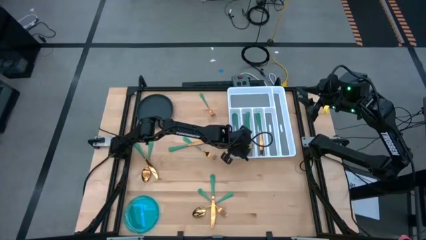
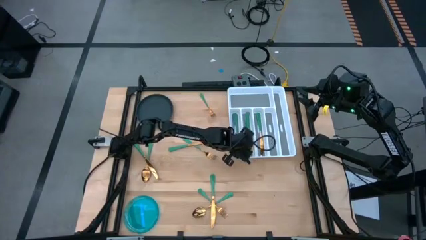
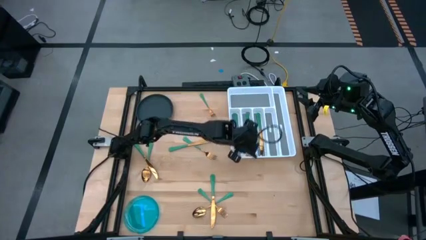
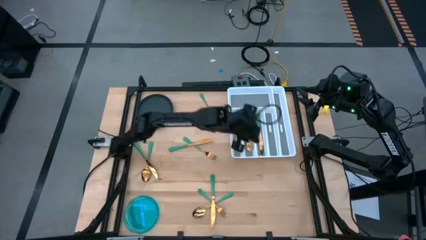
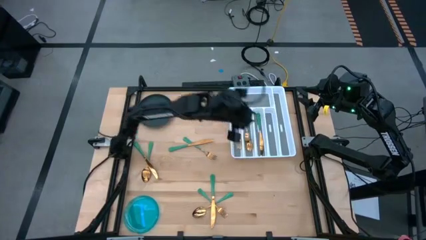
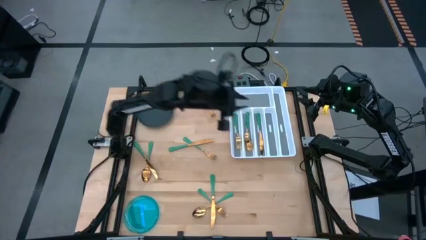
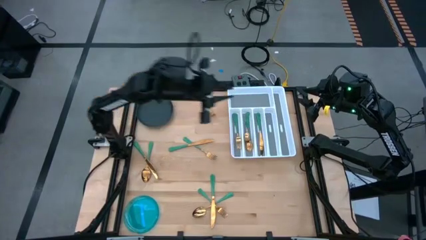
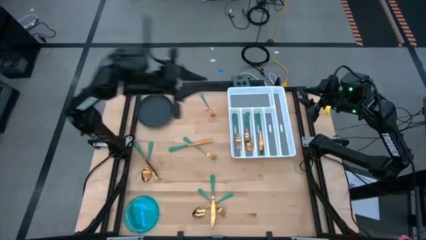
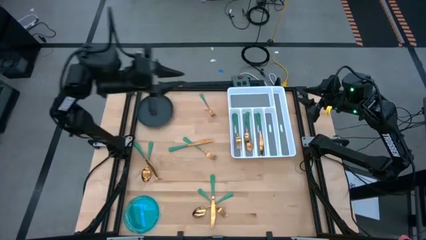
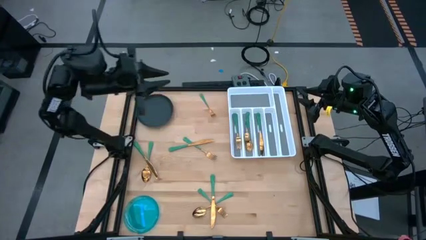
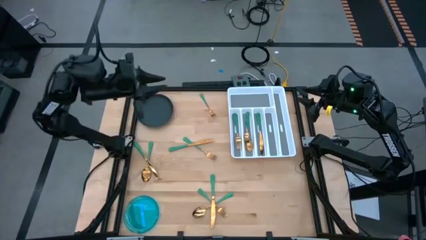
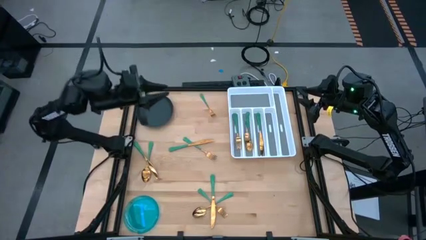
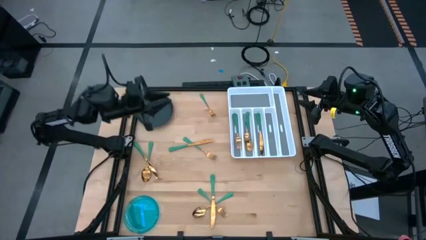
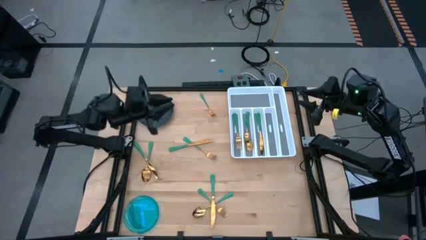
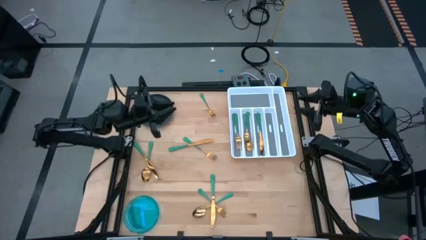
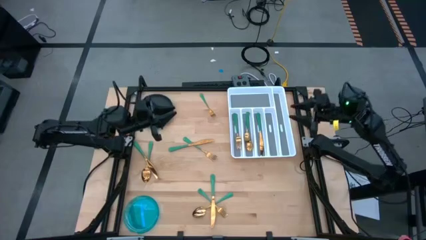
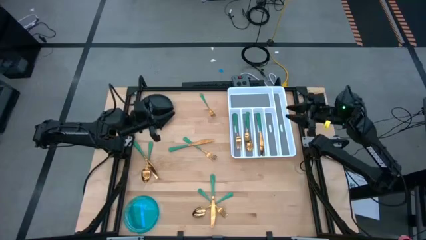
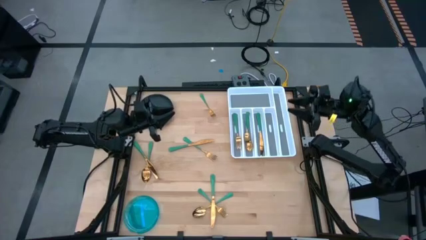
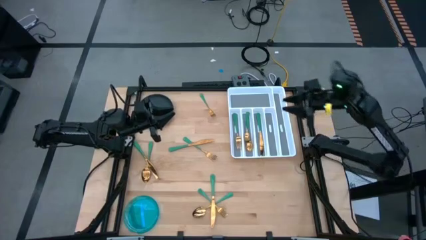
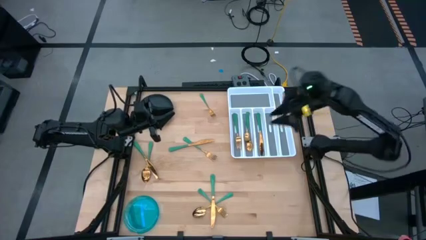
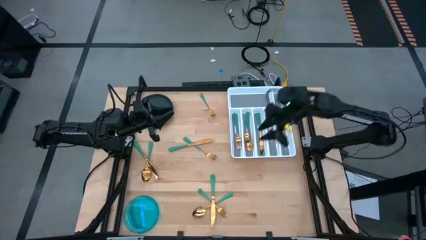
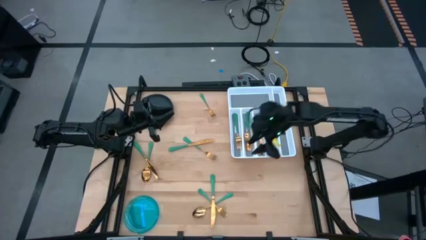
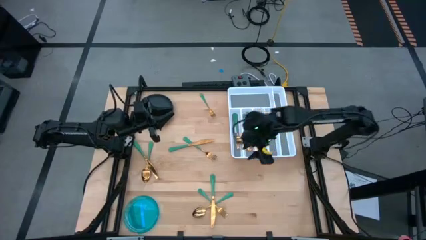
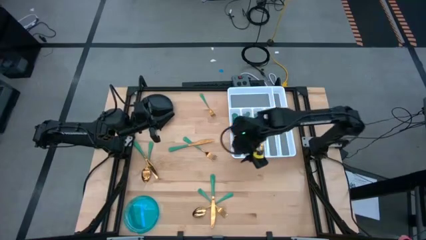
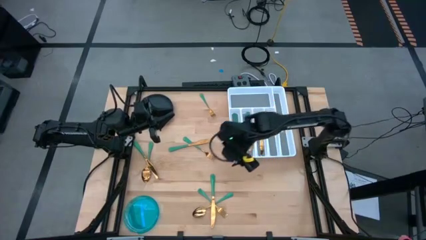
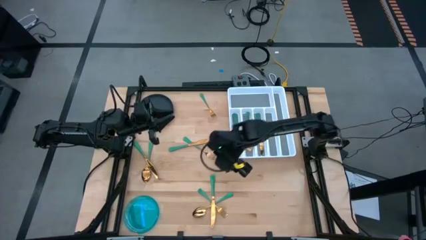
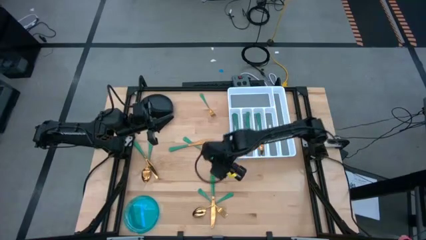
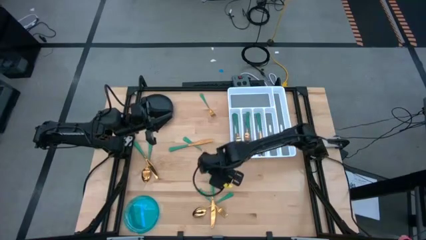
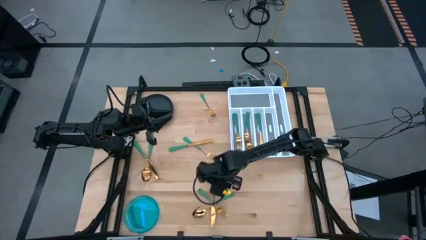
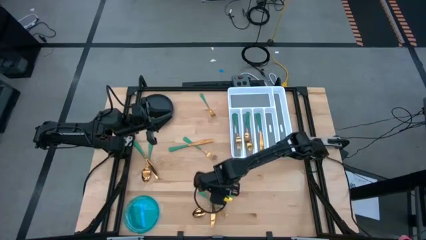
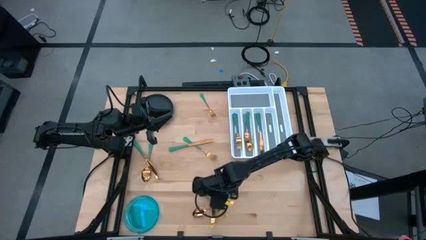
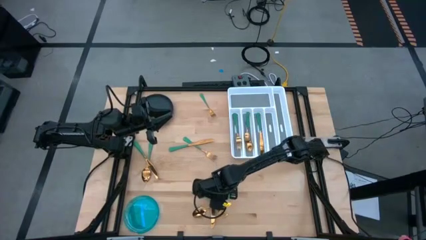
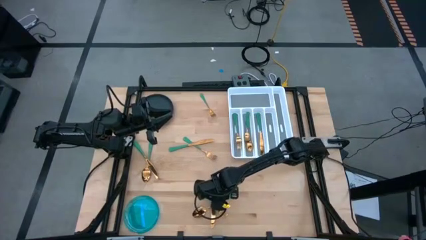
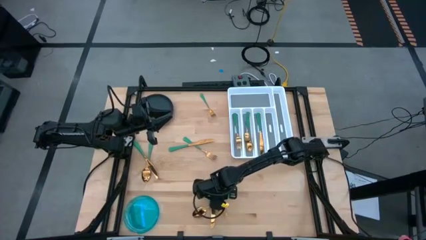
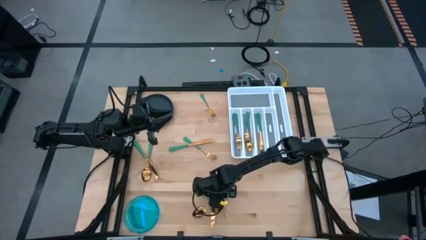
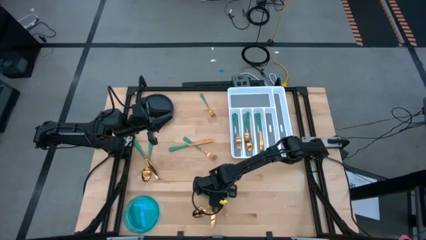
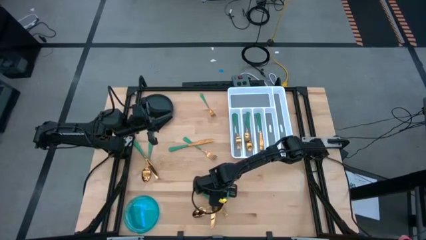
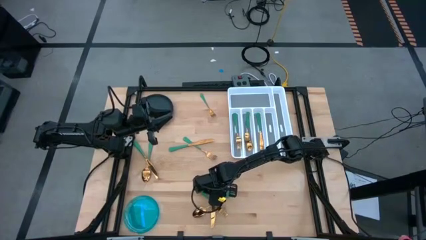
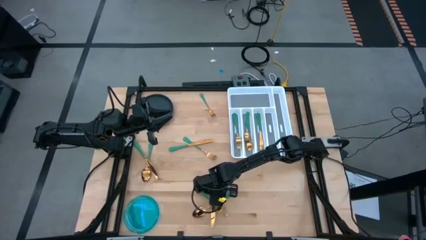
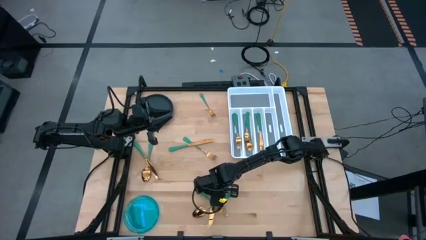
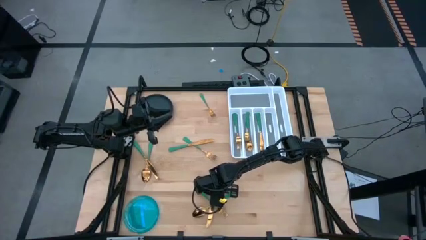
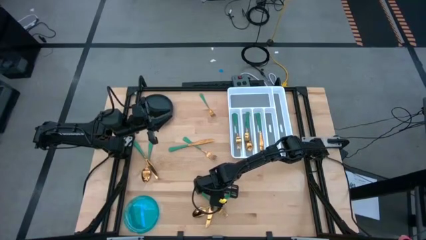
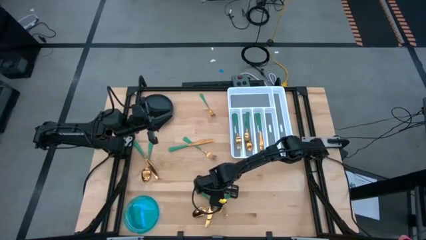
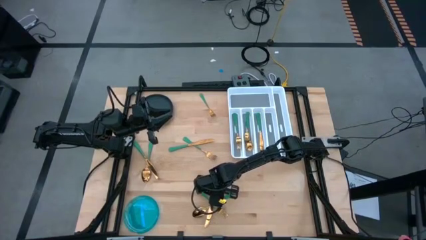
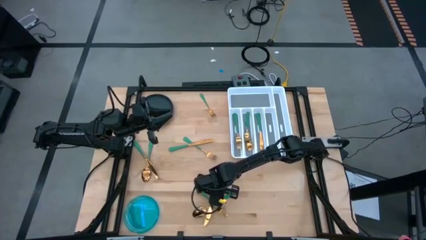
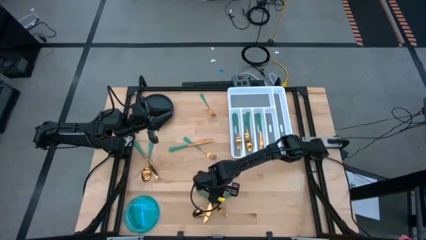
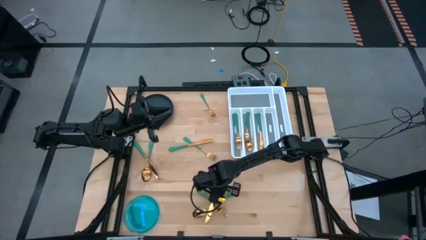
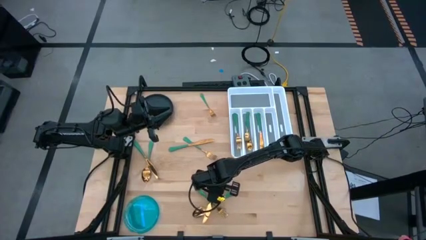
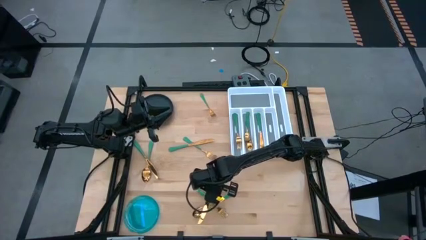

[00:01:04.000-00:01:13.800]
Task: Sort silverware
Put the green knife into the white silverware organizer

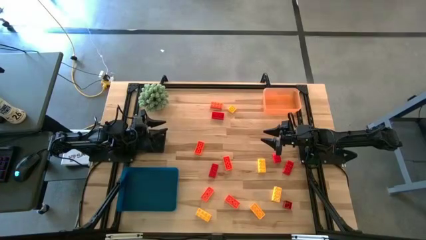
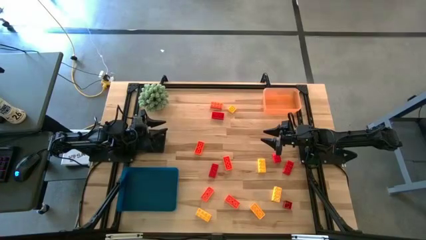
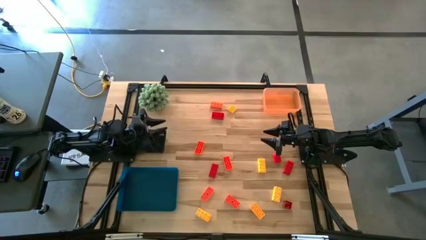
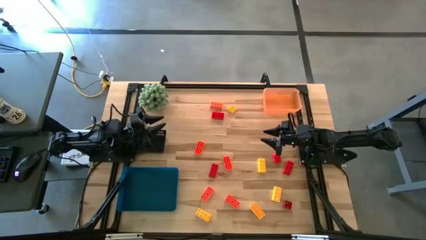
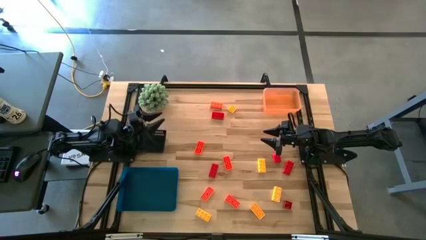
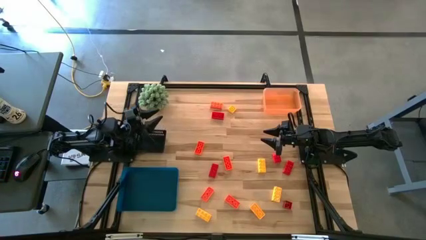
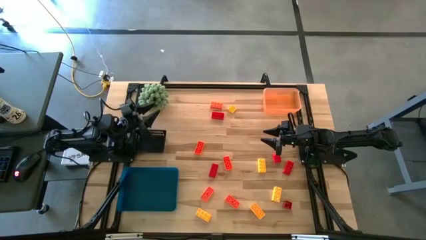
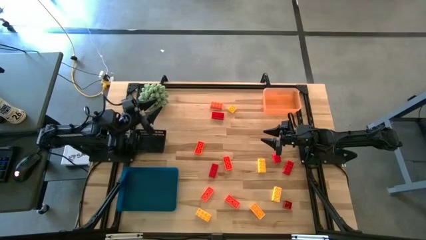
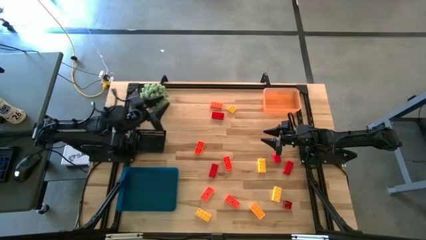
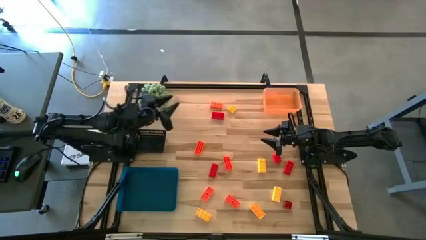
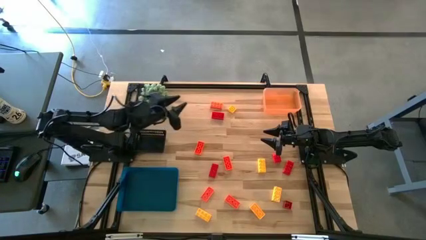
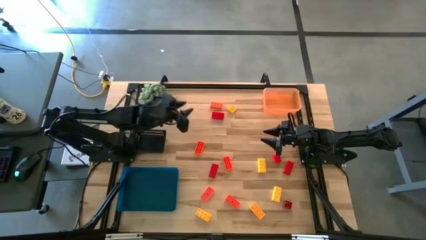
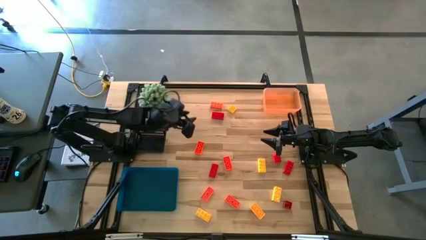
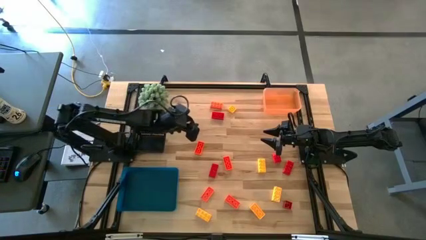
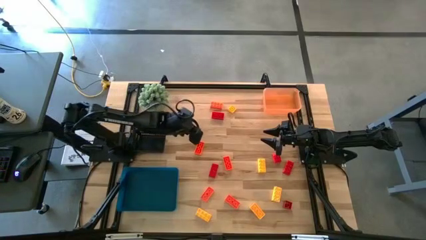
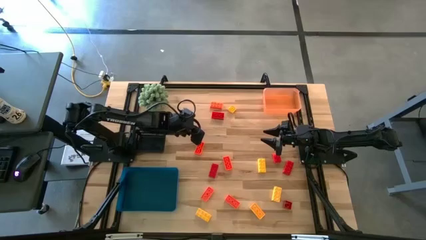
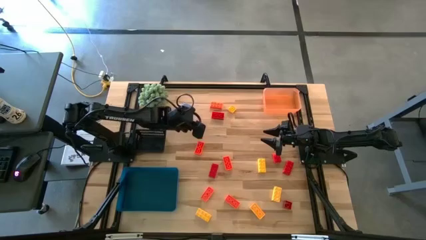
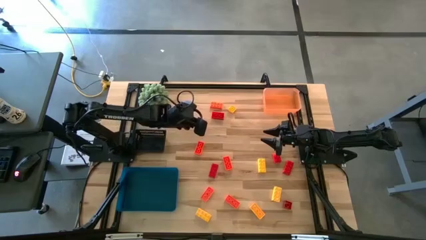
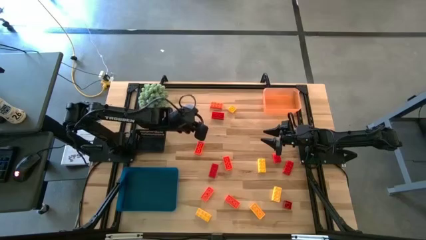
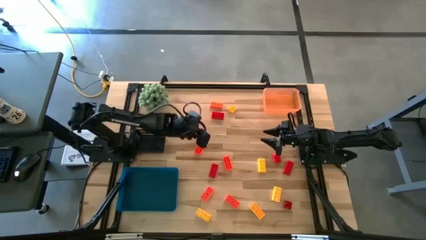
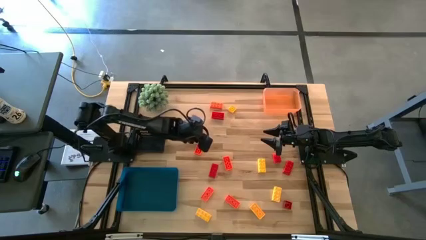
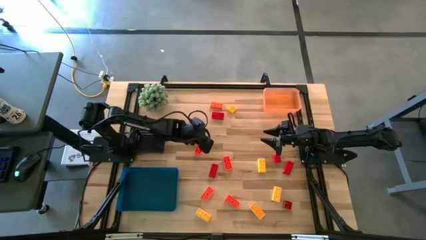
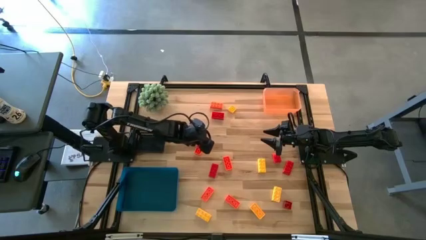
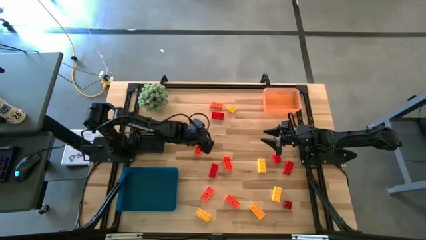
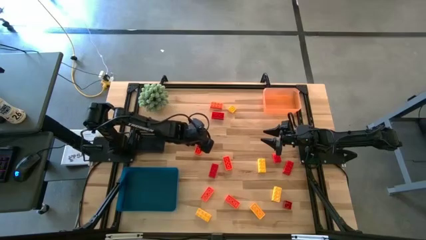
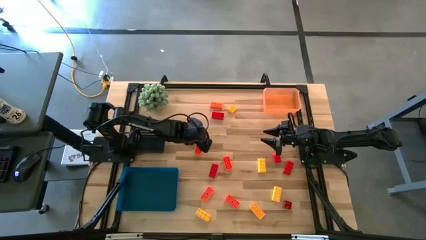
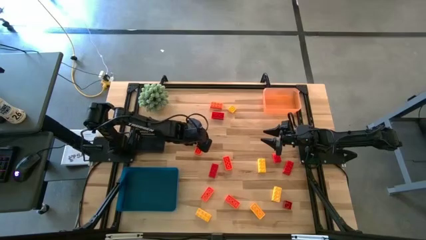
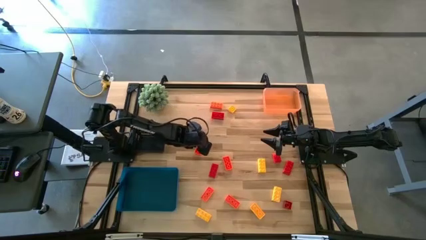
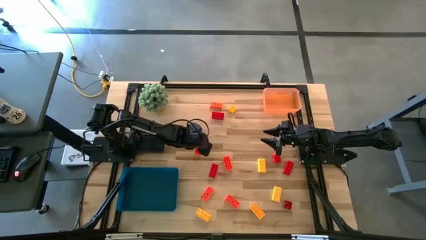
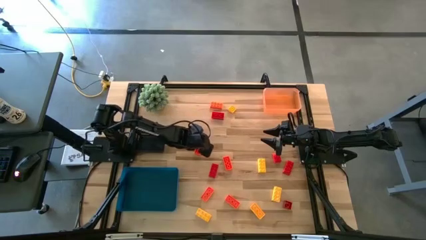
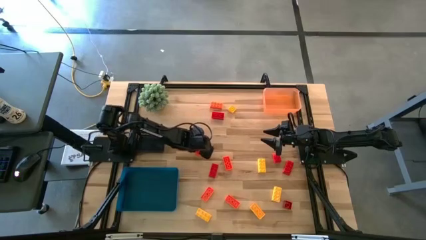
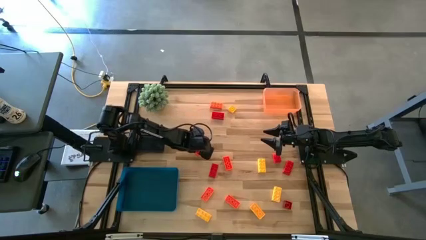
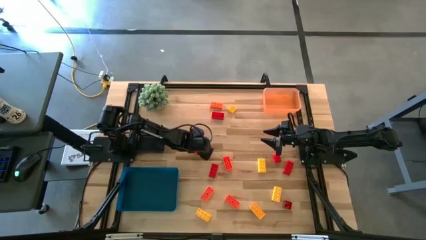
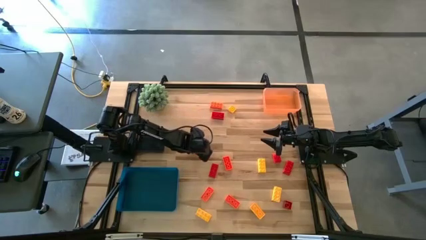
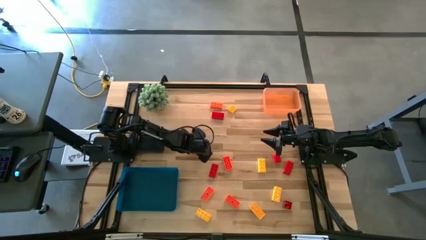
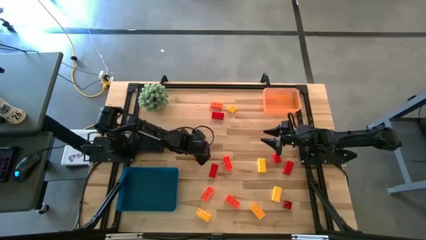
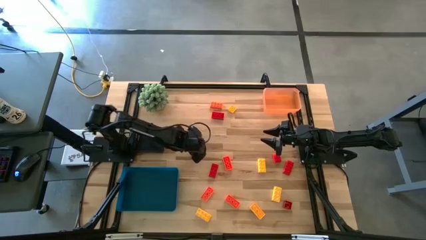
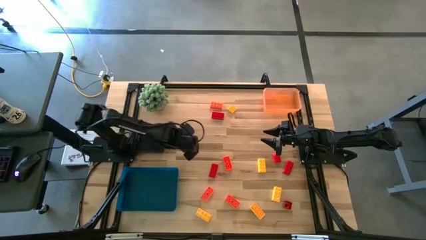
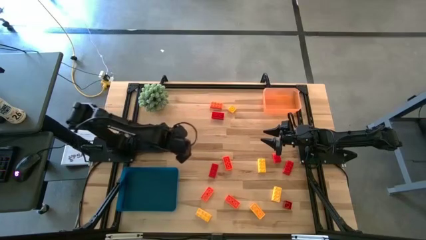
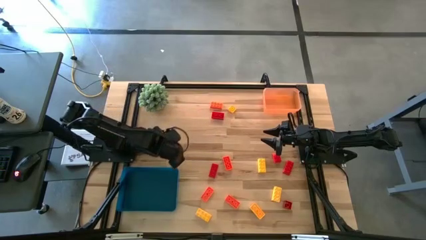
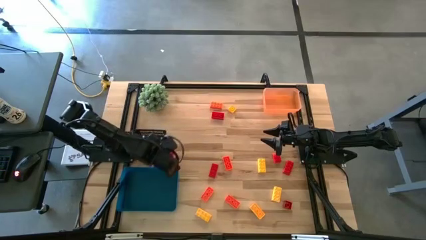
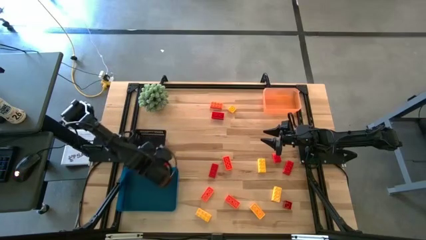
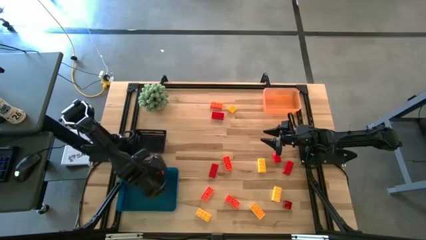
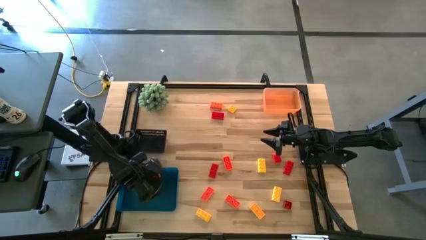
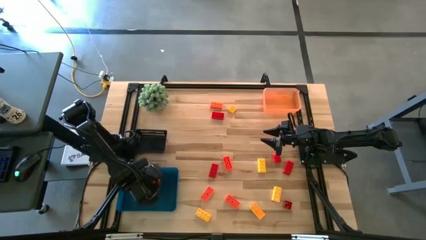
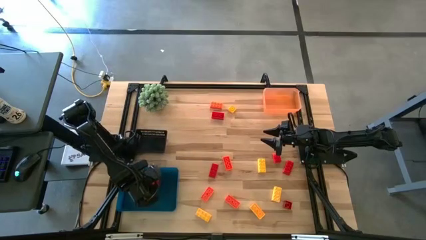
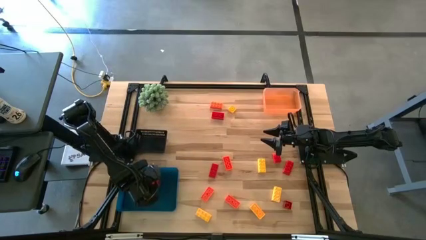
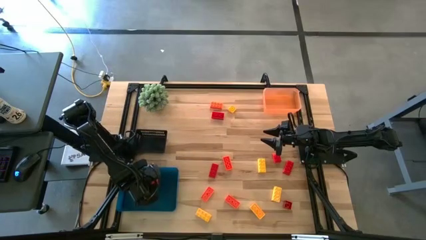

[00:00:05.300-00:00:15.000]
Task: Sort & place blocks by color
Put the orange game piece into the blue bin
